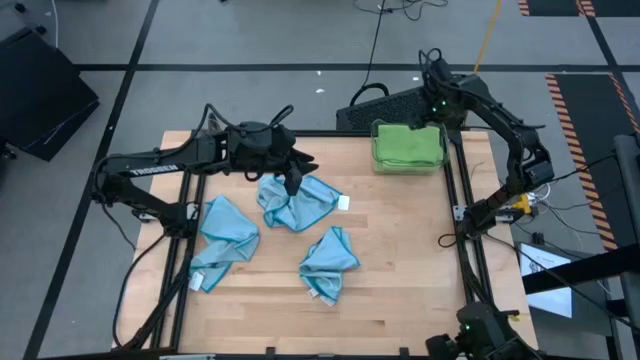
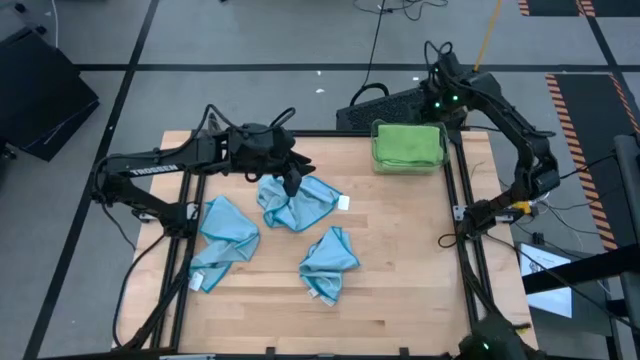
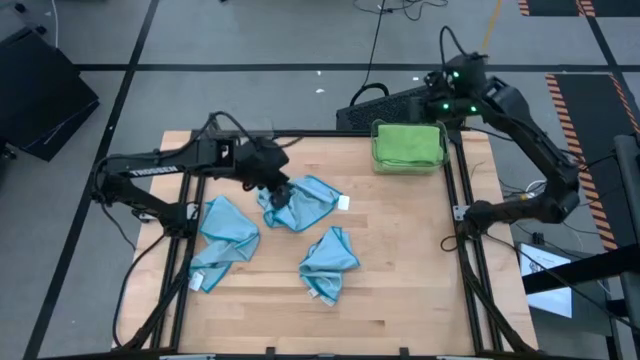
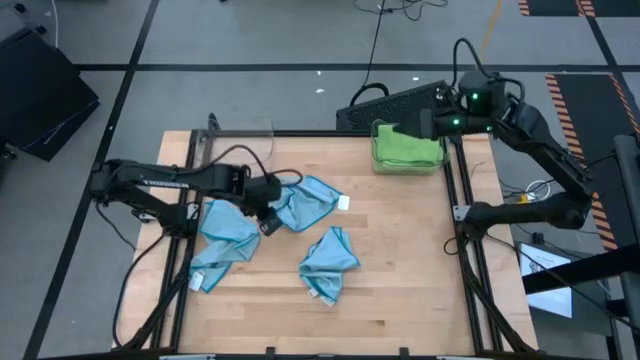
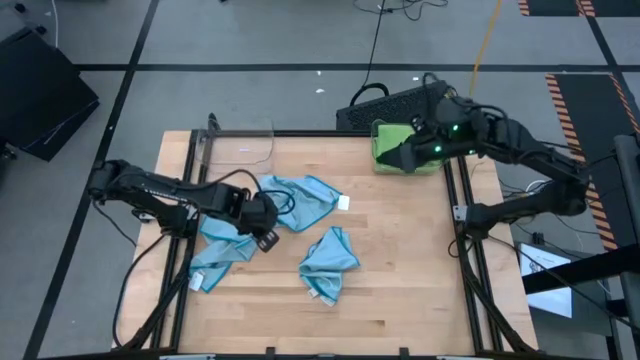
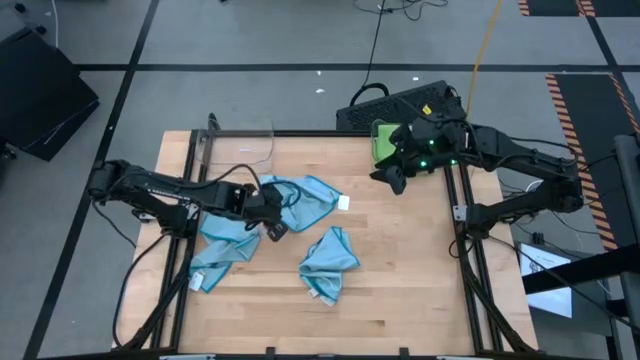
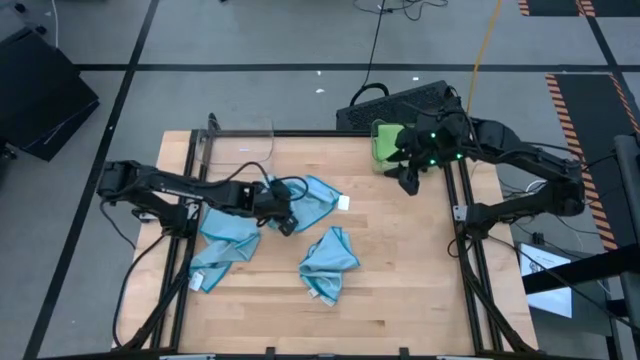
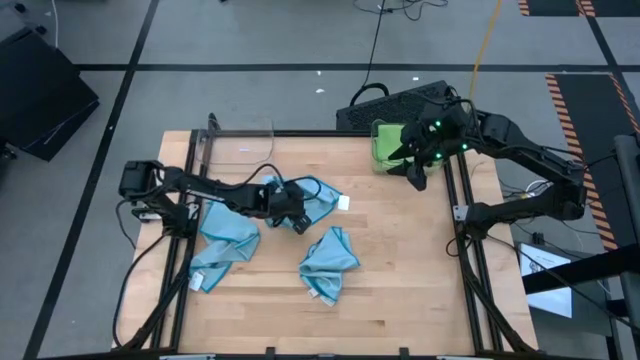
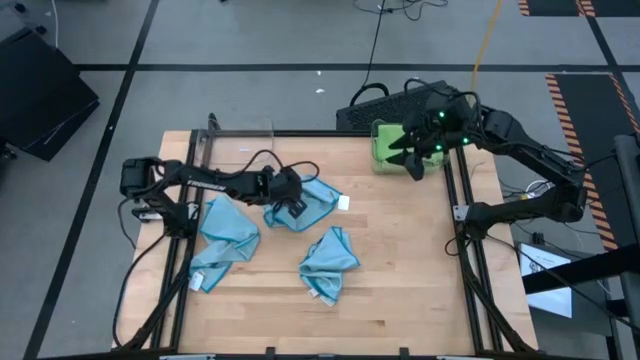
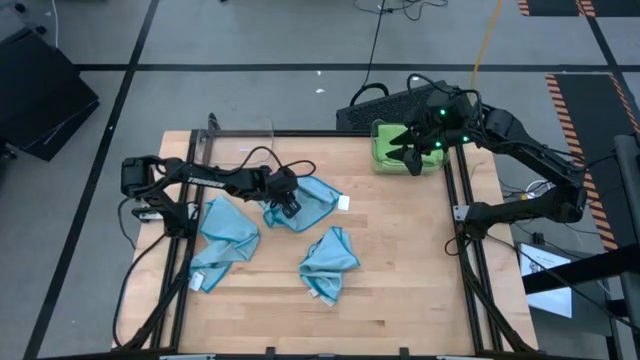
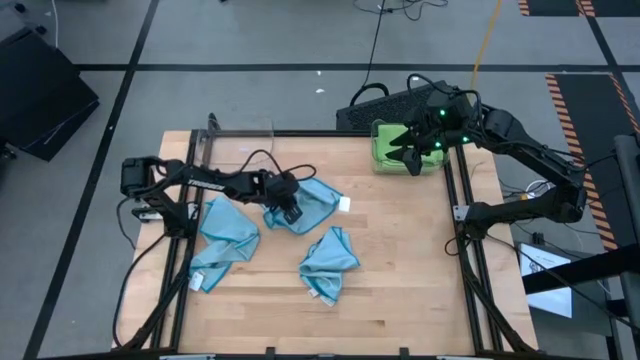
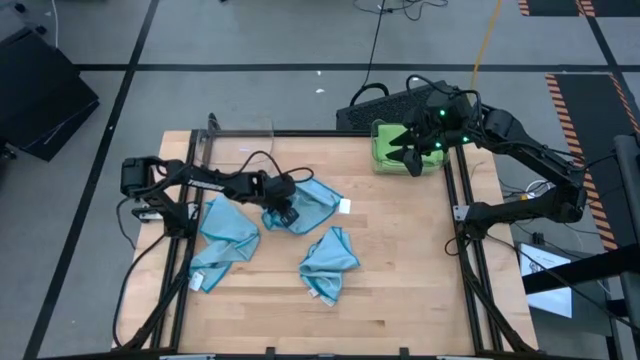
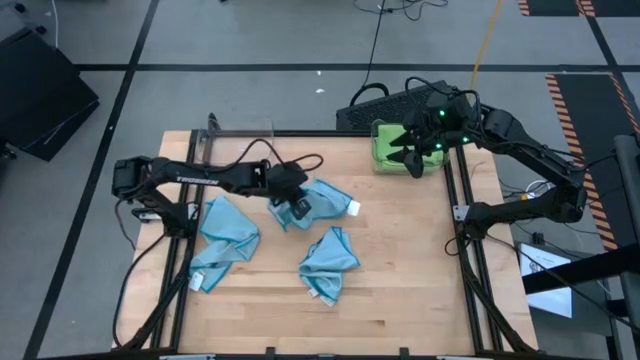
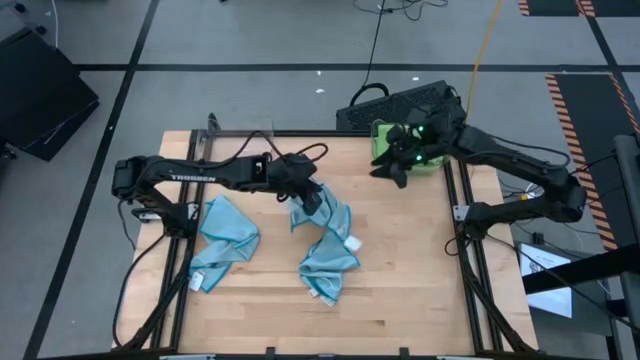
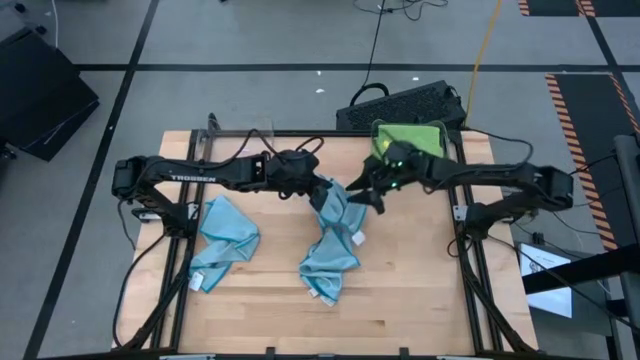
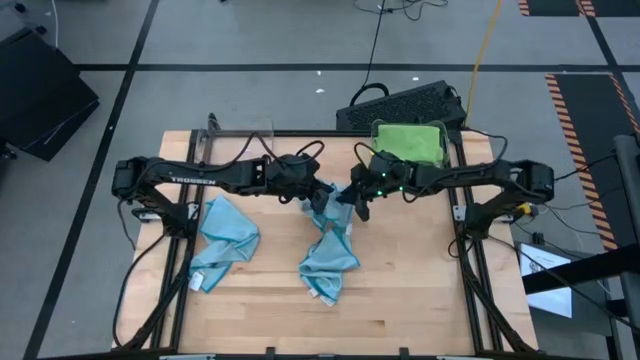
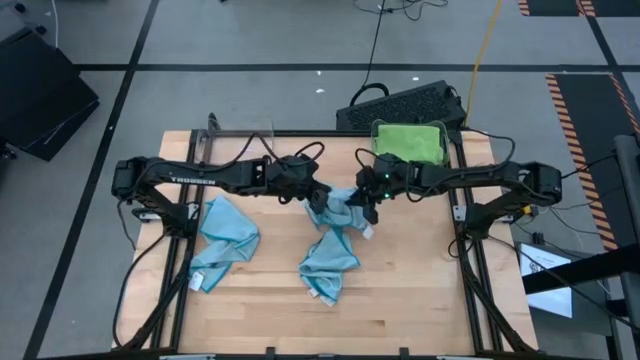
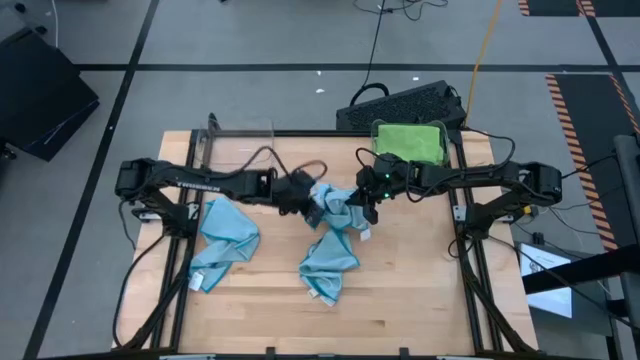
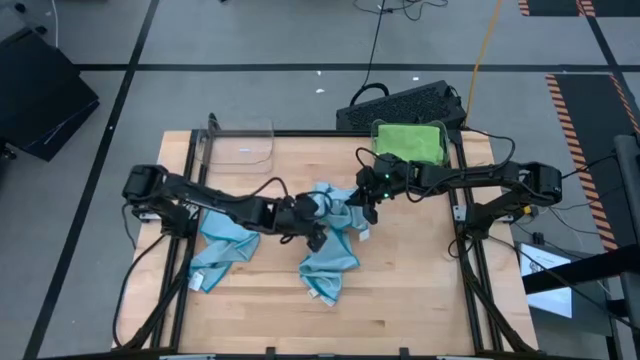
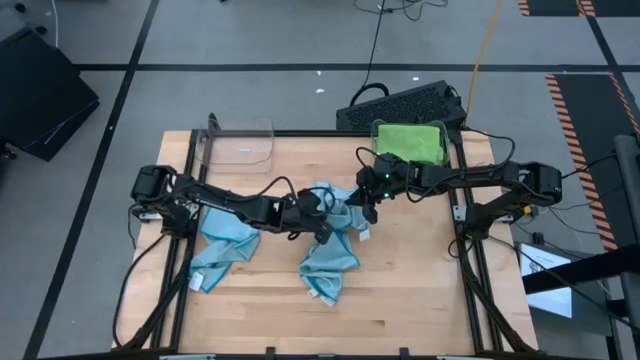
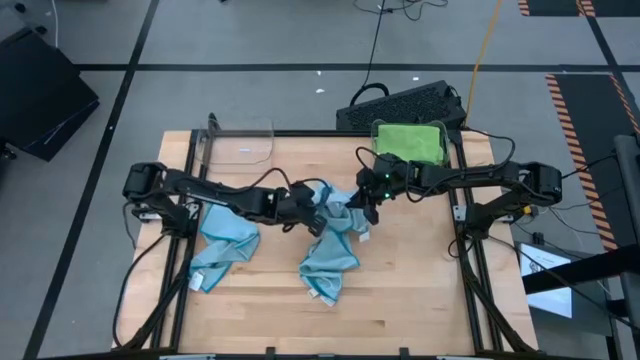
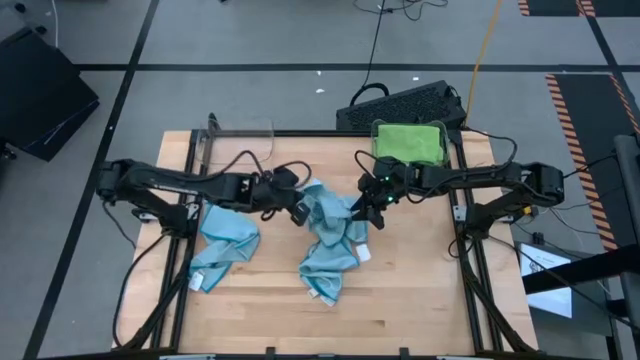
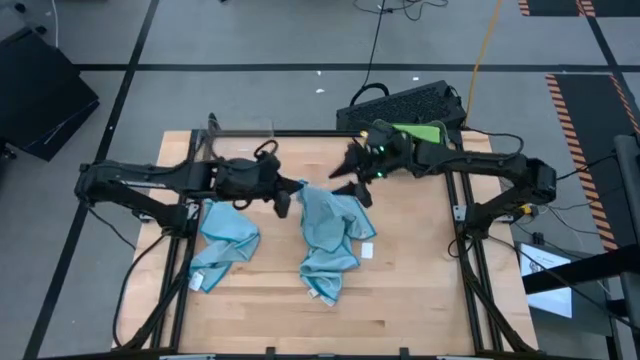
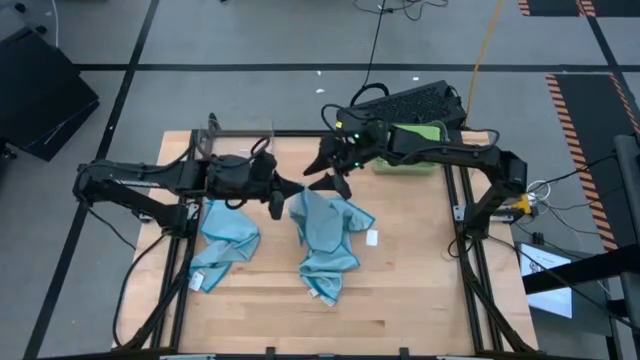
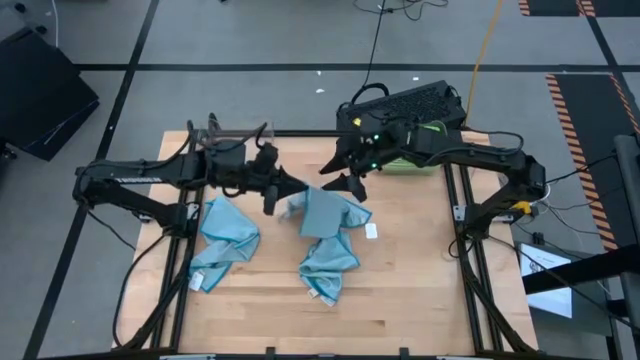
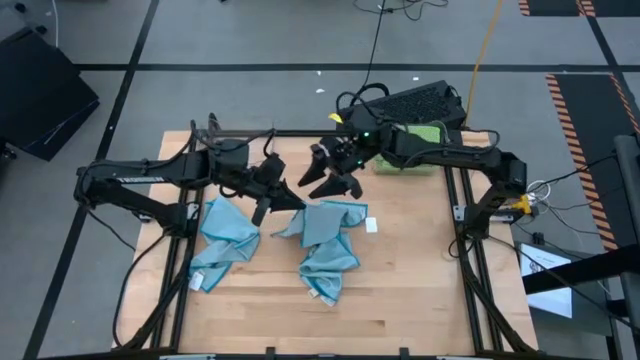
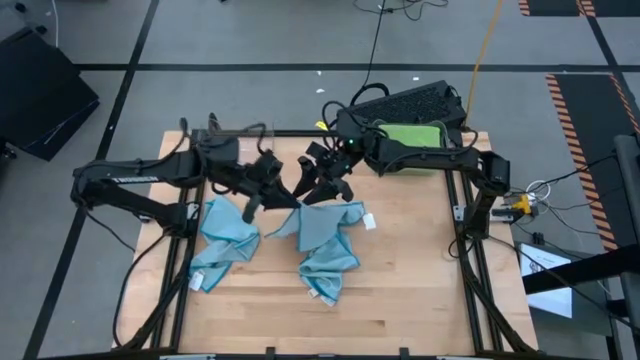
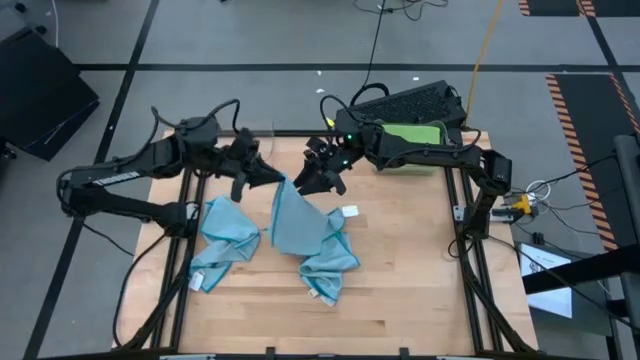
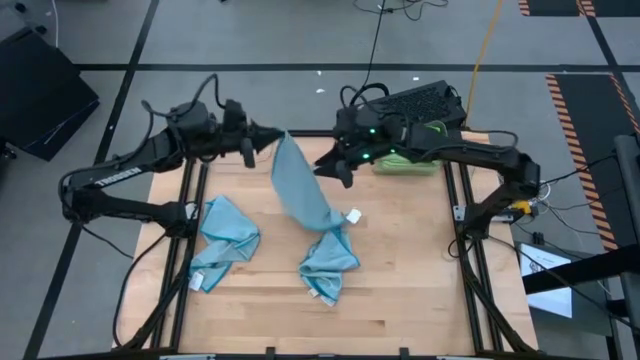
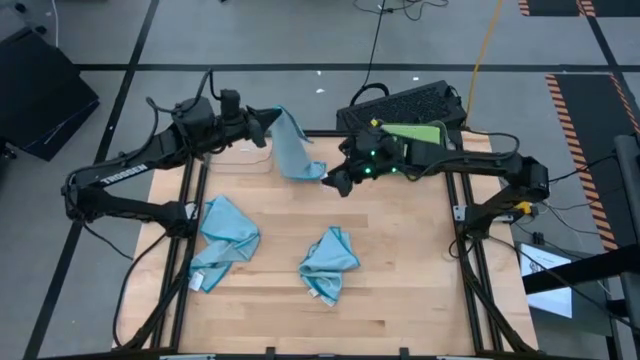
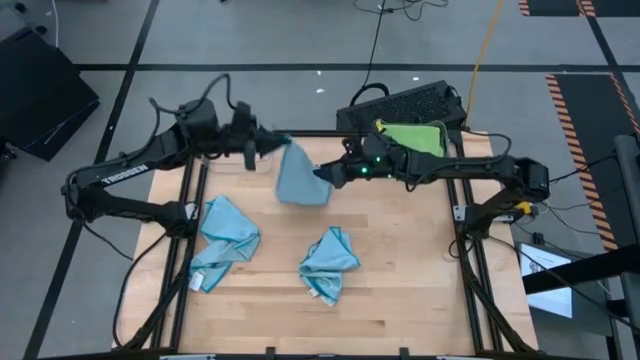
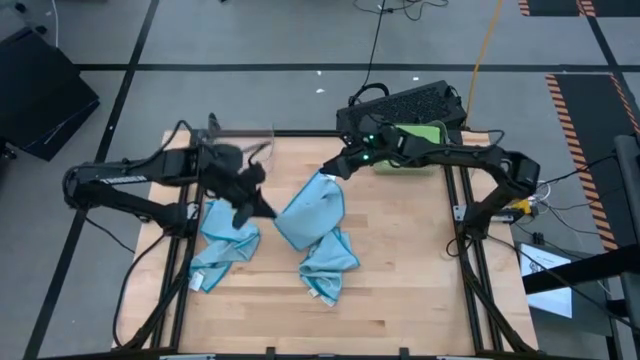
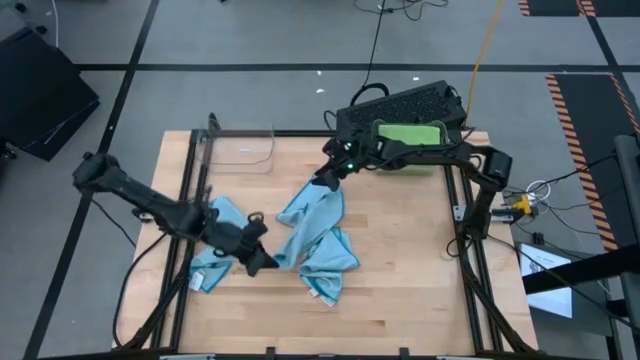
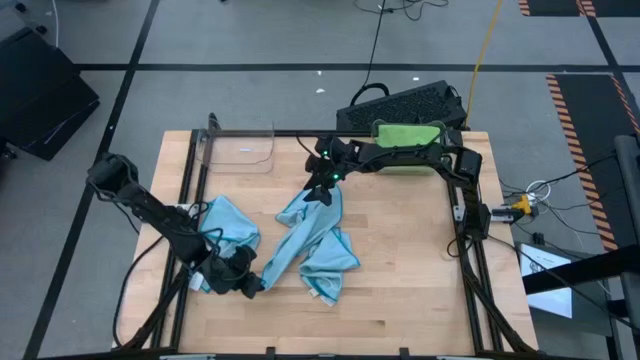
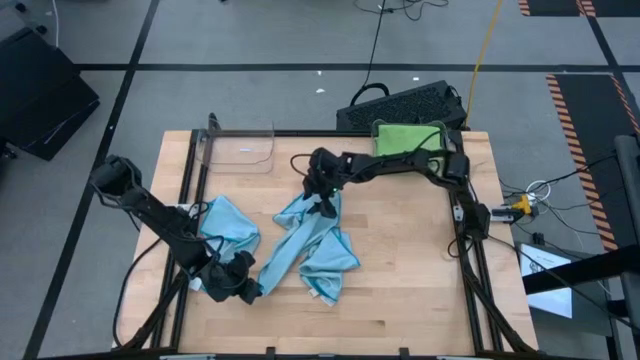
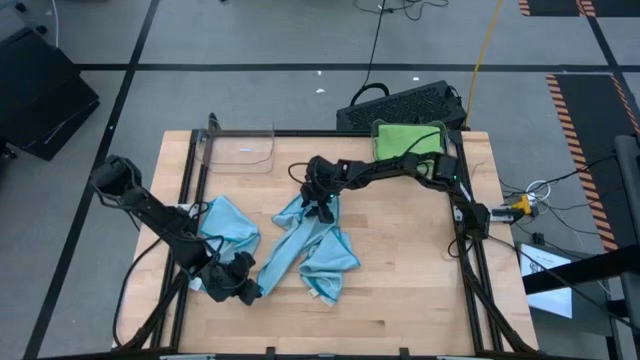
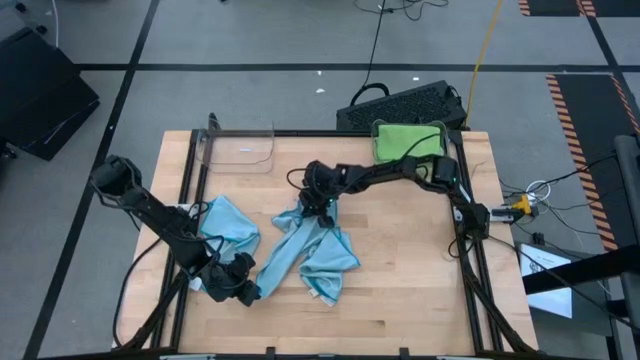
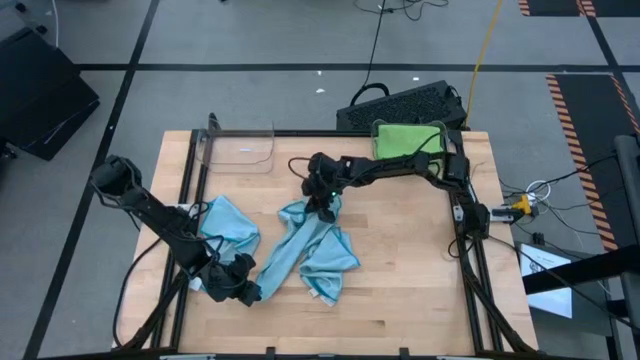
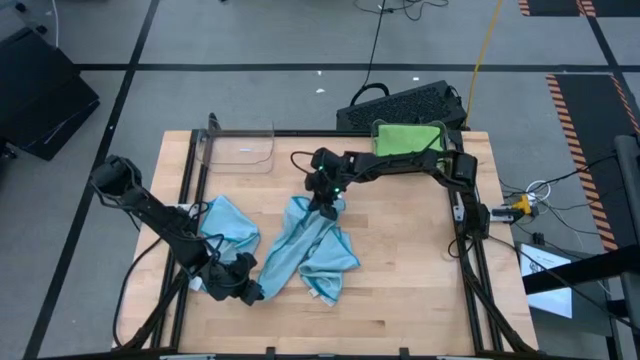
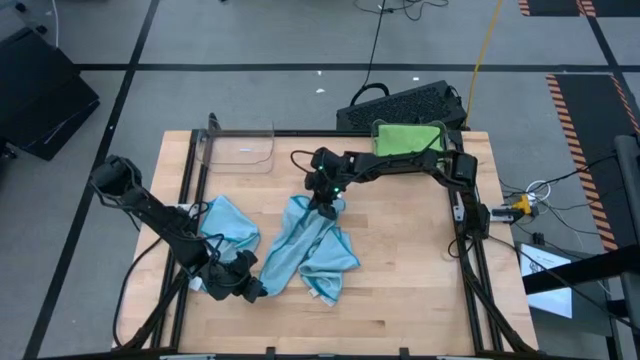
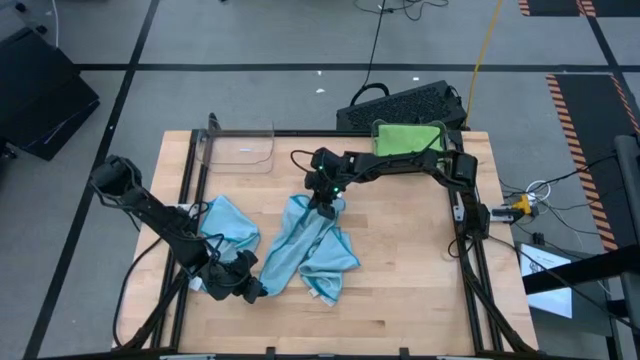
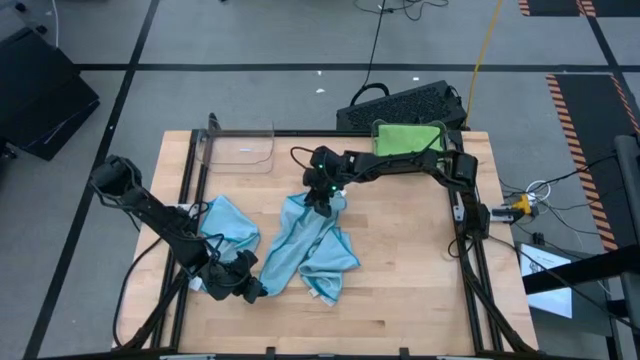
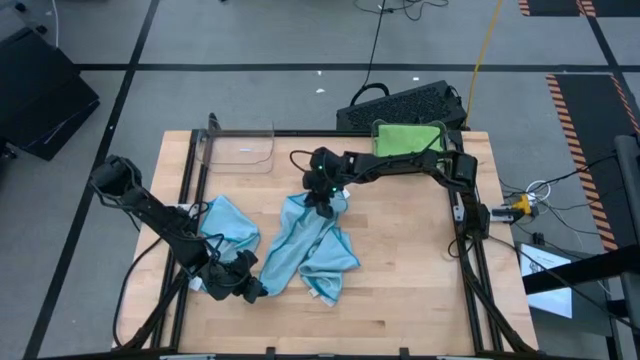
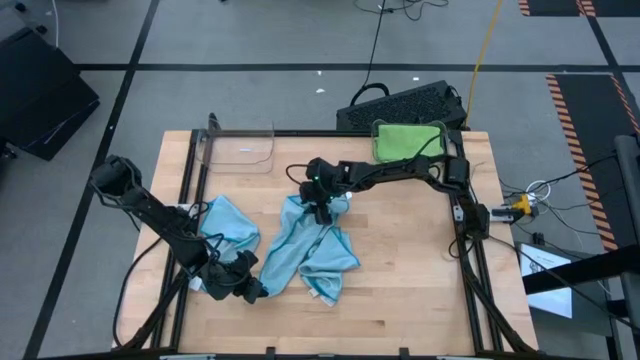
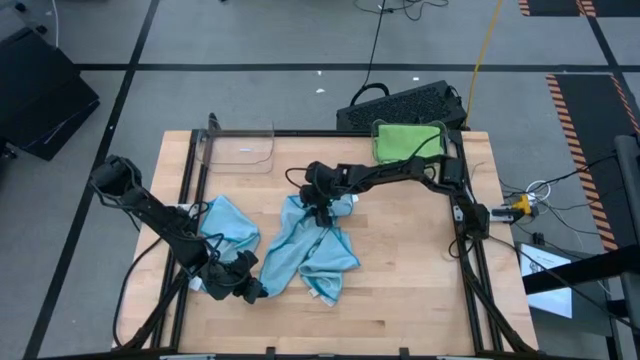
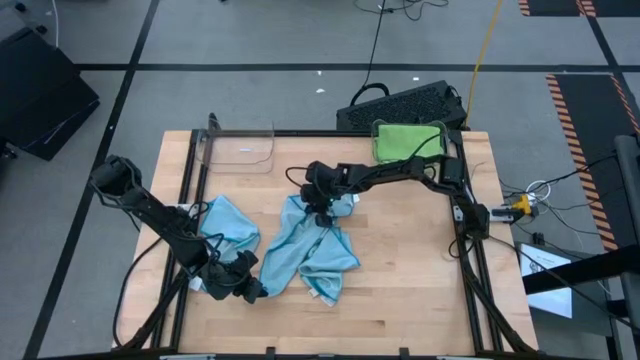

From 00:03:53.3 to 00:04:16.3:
Task: Sort microfiber towel by color & place in baskets
Fold the top blue towel
